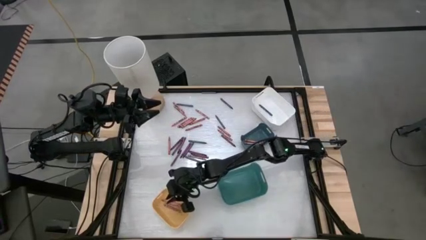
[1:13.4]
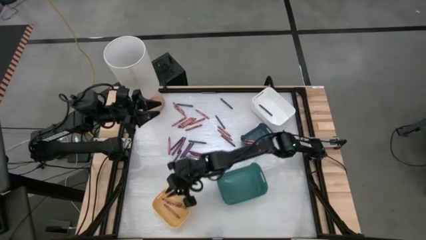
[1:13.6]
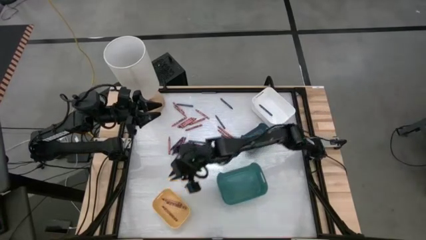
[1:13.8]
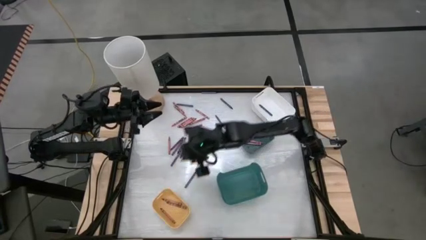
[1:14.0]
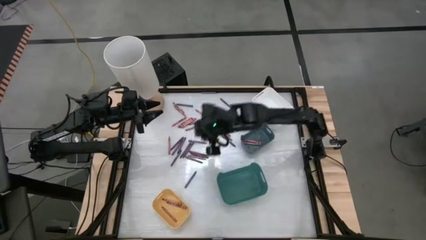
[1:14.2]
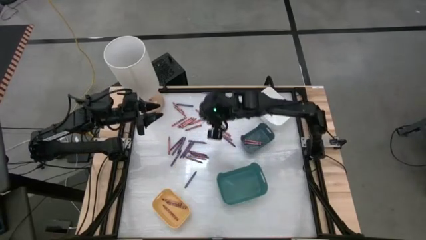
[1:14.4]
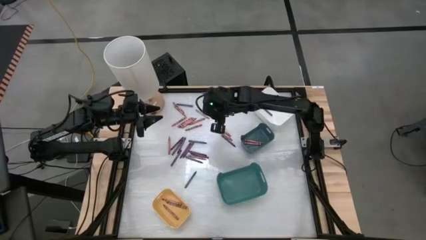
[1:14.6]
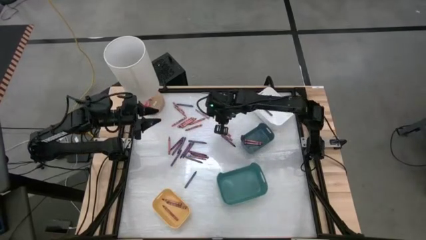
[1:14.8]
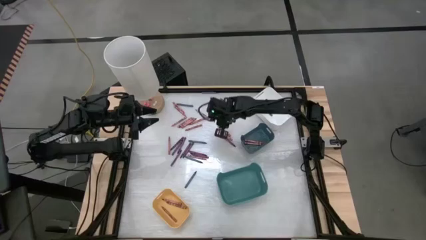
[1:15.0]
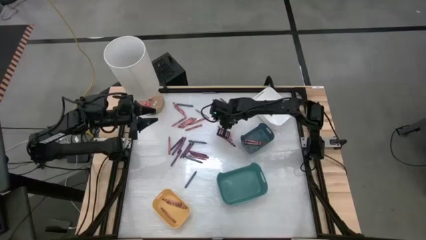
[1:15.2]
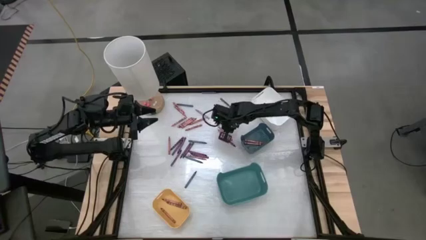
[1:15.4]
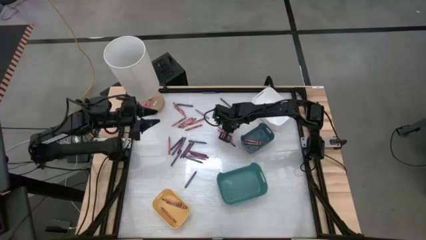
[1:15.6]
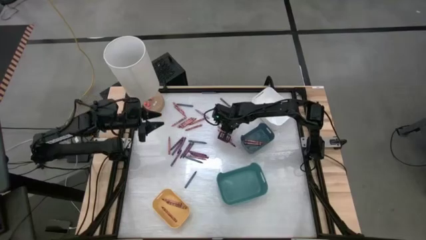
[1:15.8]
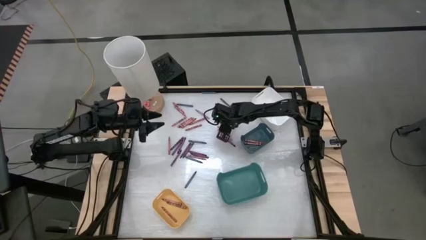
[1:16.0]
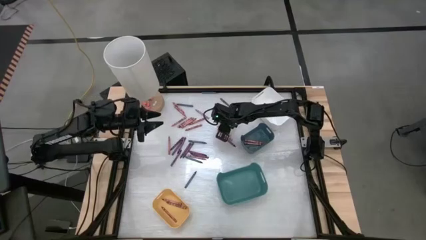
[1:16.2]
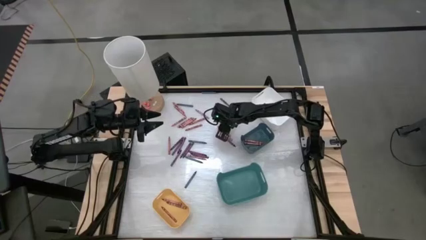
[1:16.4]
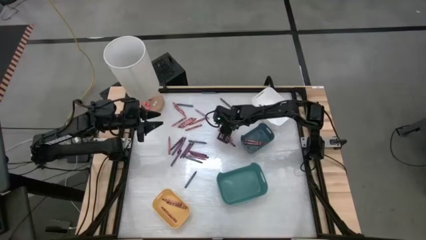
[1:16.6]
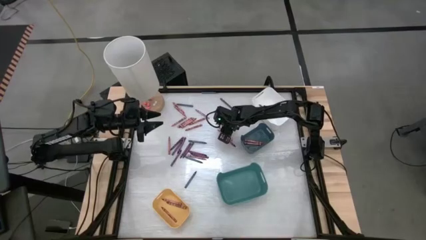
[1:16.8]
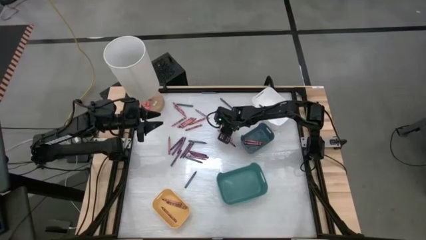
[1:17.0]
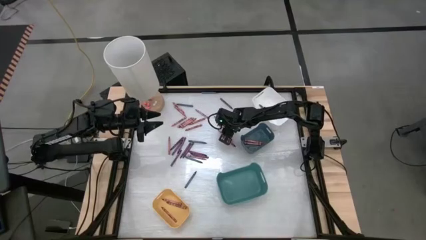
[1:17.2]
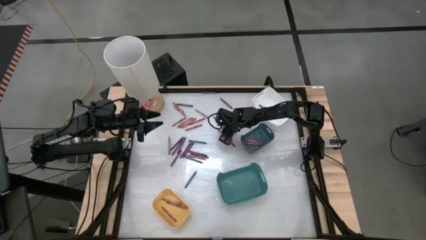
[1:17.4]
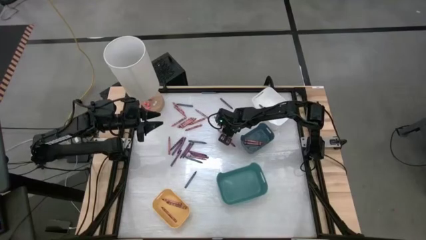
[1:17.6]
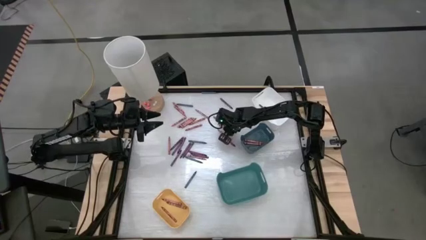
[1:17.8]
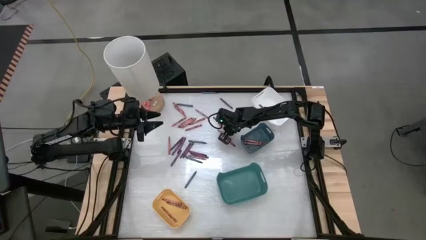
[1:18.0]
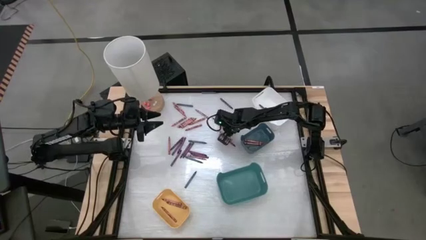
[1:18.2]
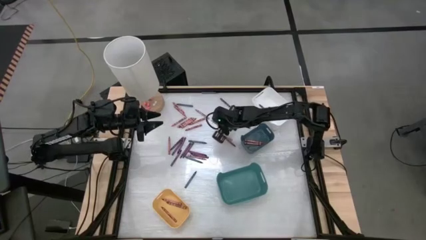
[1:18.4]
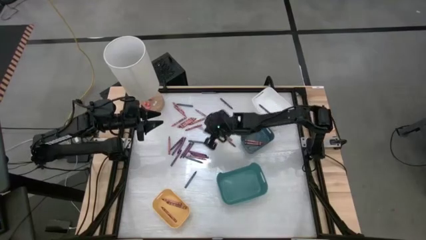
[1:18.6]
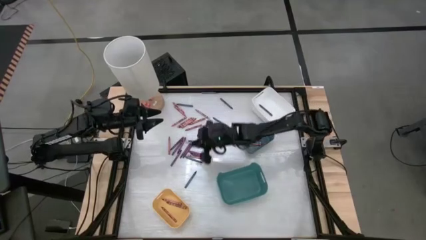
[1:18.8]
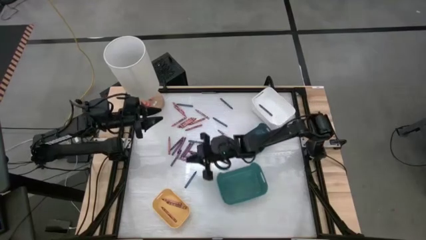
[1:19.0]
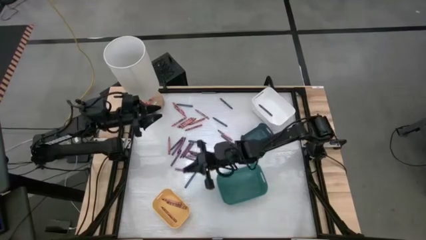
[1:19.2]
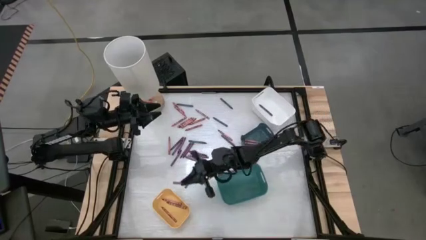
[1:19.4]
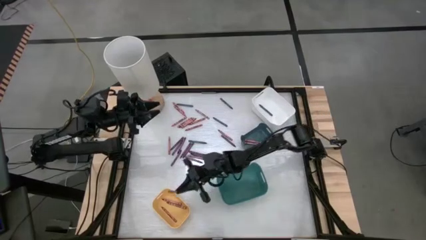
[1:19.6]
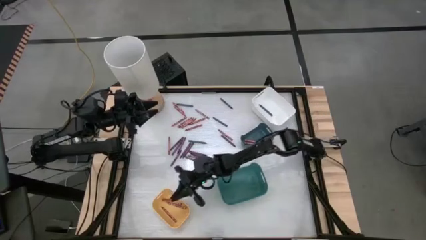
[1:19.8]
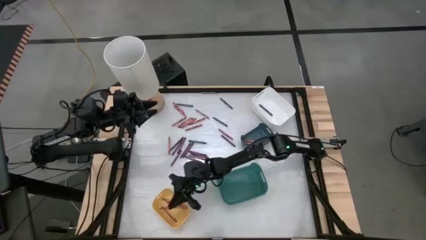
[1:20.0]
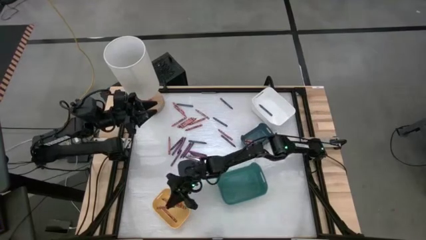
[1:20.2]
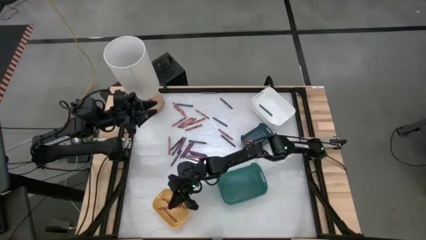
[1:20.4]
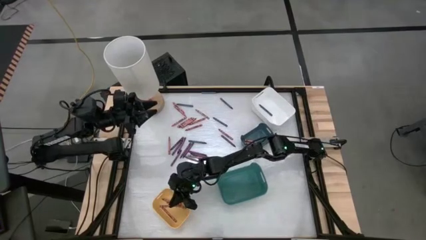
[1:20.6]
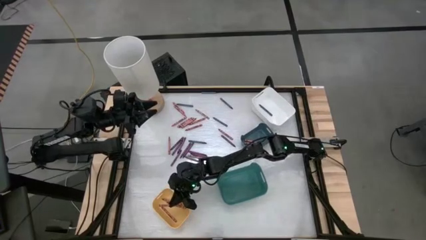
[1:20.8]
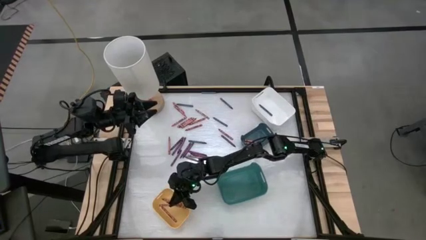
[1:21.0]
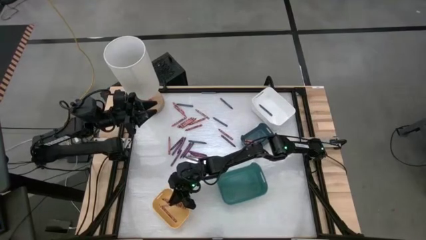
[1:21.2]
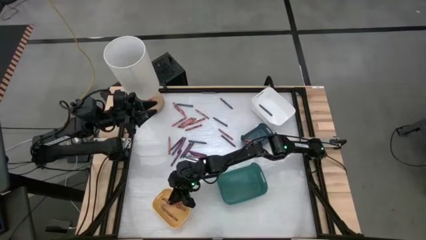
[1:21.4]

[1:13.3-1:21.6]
Task: Sort crayons
Put the red crayon into the yellow bin

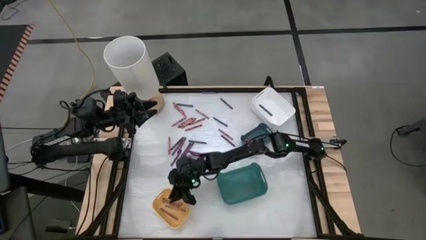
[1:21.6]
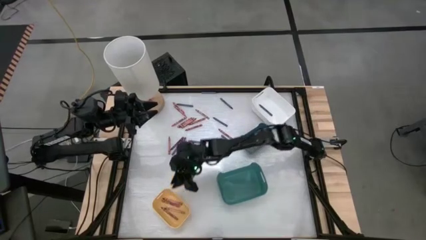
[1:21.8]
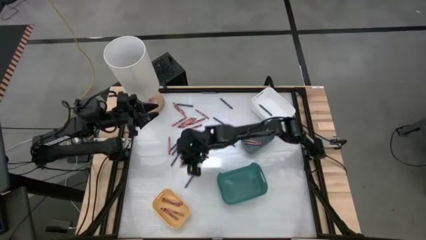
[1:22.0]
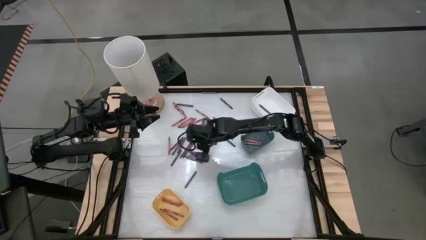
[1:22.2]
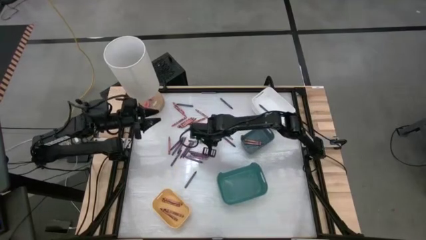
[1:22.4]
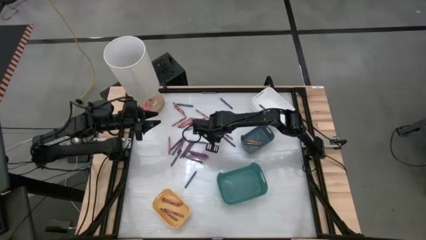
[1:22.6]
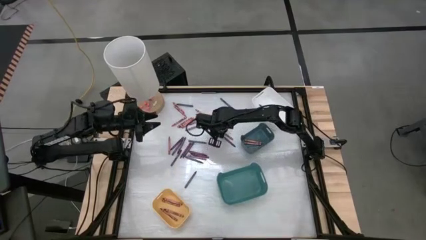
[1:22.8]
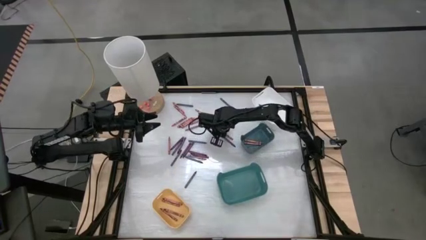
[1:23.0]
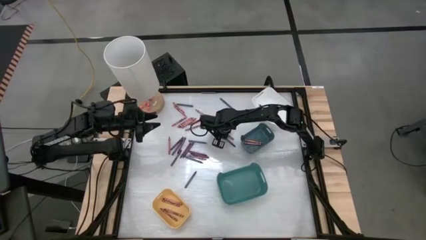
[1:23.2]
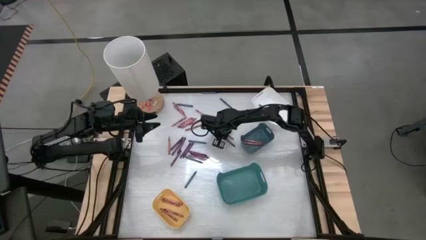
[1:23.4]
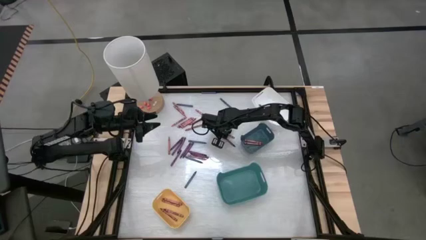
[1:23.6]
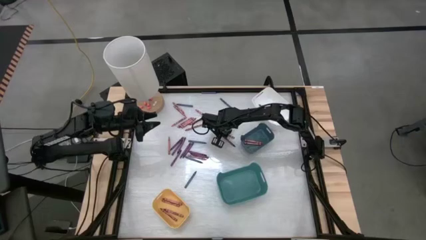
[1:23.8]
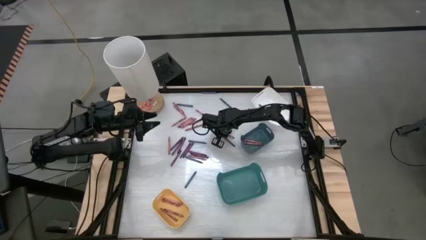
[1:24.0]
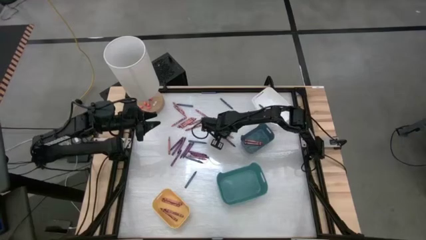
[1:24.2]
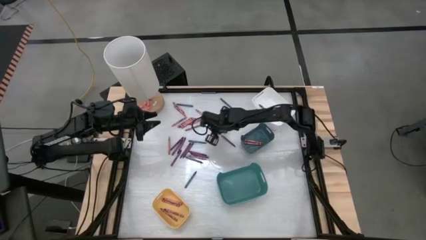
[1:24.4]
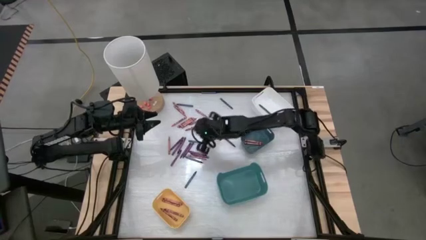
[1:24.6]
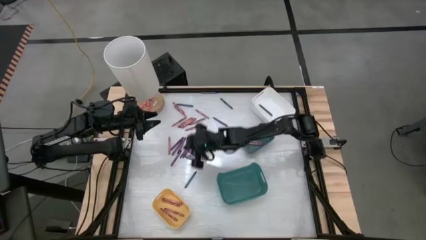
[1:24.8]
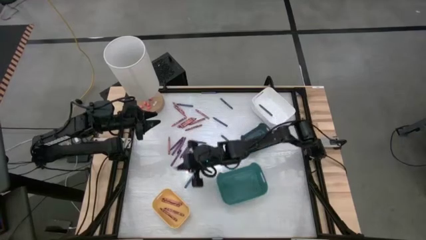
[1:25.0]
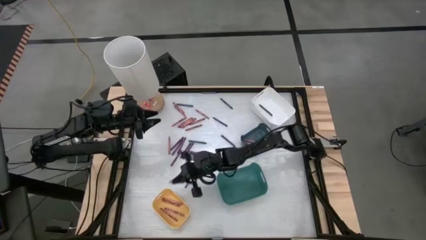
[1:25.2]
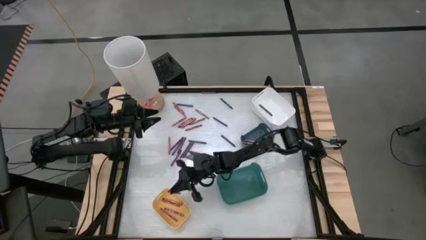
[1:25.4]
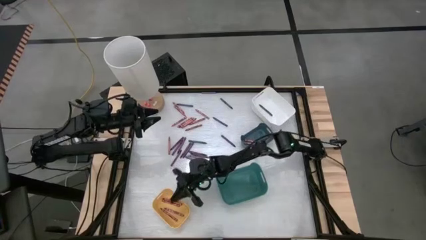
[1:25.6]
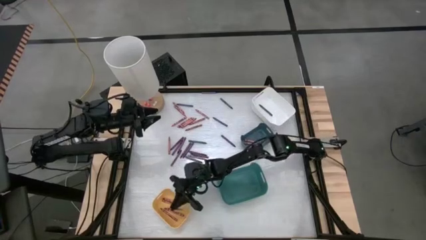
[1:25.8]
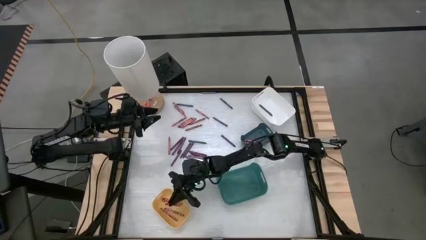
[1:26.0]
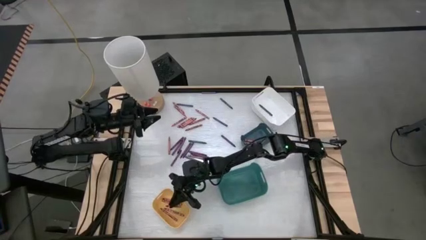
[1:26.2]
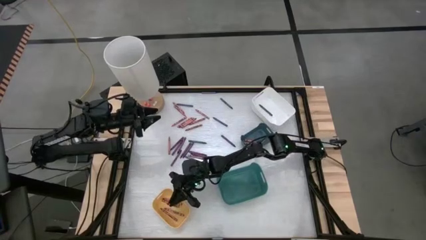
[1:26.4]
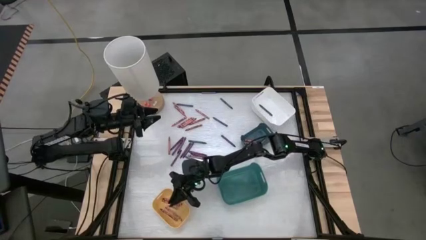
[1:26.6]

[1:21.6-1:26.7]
Put the red crayon into the yellow bin

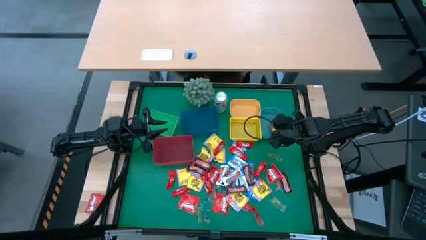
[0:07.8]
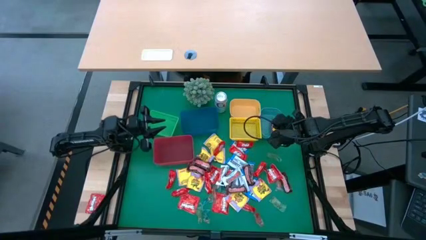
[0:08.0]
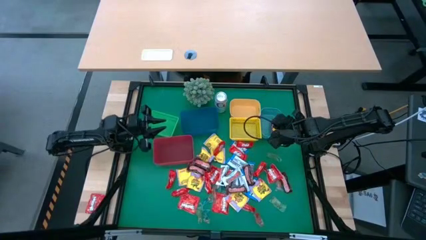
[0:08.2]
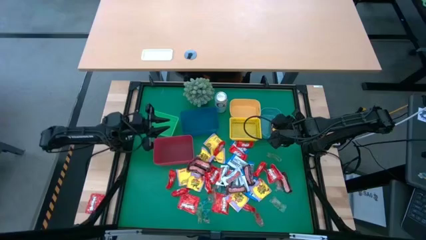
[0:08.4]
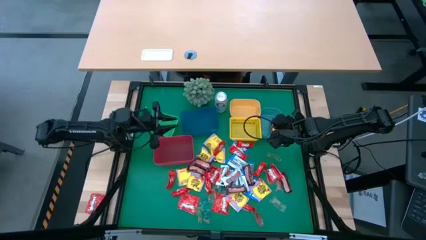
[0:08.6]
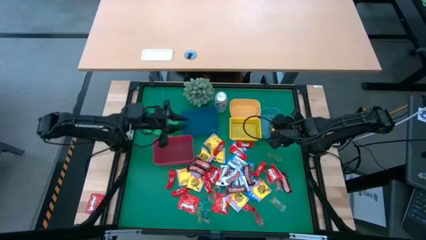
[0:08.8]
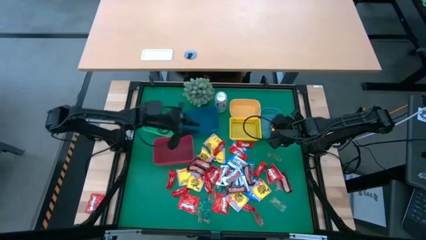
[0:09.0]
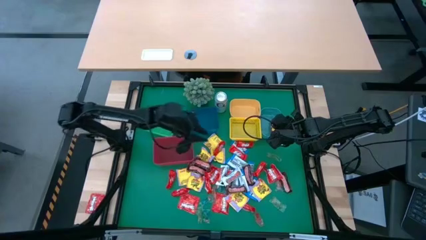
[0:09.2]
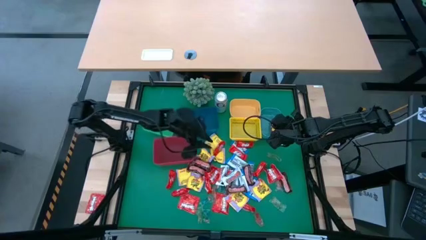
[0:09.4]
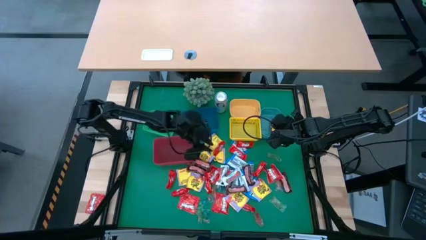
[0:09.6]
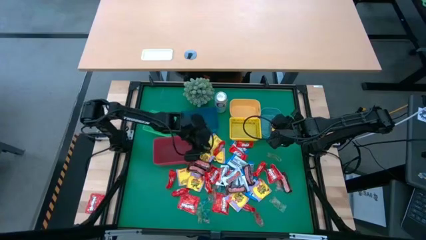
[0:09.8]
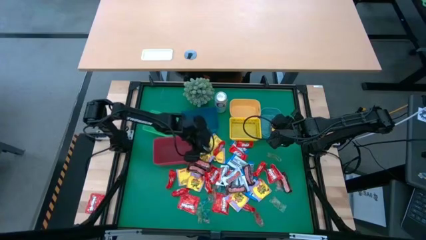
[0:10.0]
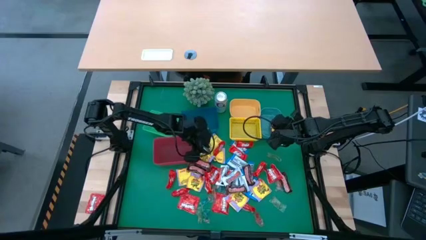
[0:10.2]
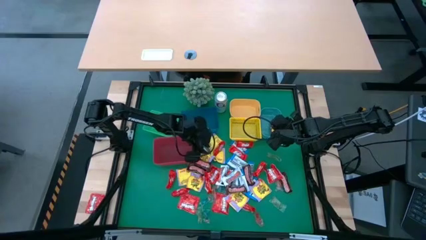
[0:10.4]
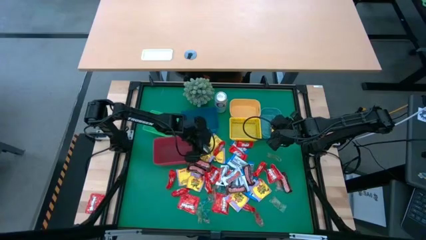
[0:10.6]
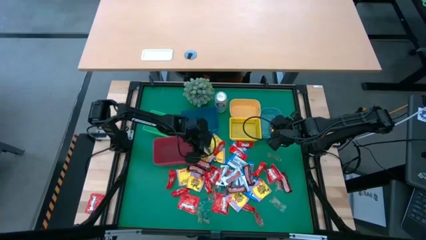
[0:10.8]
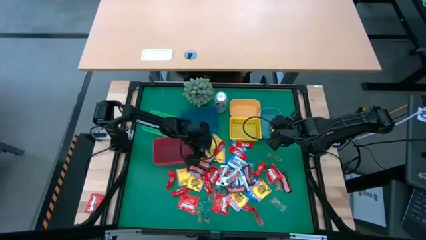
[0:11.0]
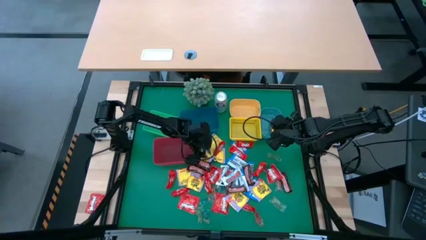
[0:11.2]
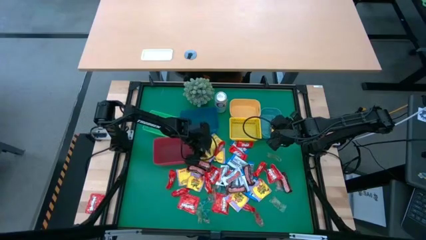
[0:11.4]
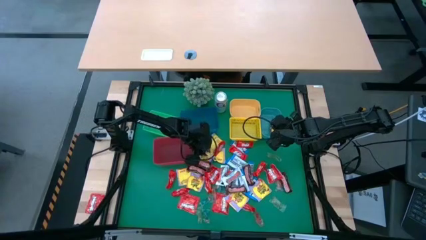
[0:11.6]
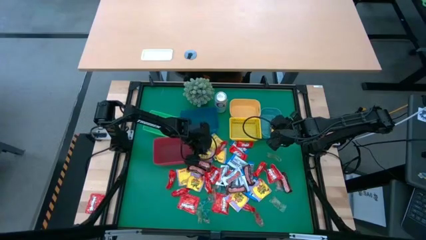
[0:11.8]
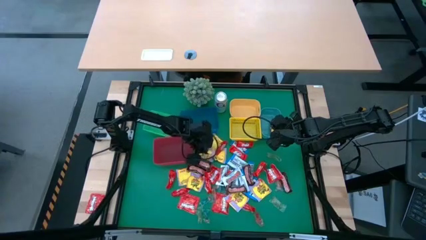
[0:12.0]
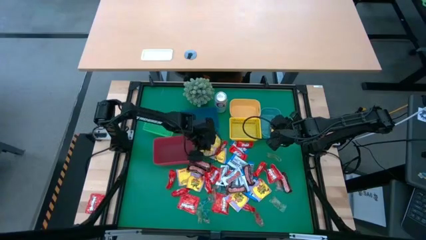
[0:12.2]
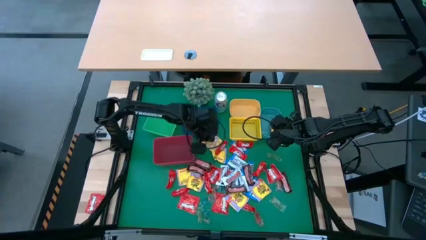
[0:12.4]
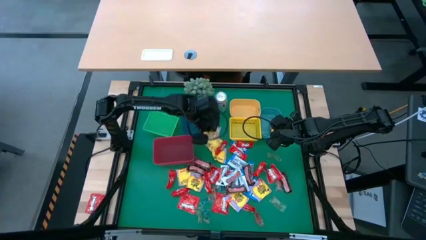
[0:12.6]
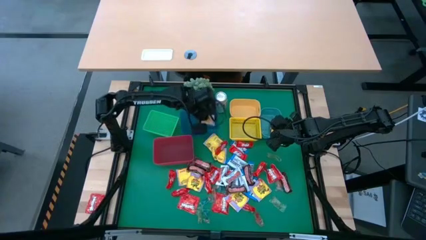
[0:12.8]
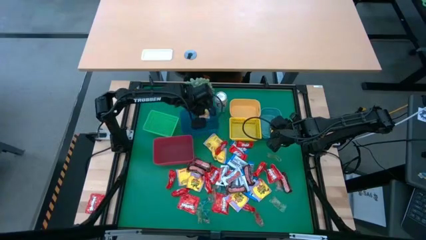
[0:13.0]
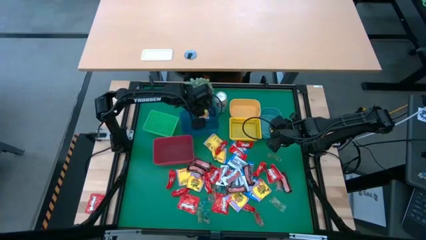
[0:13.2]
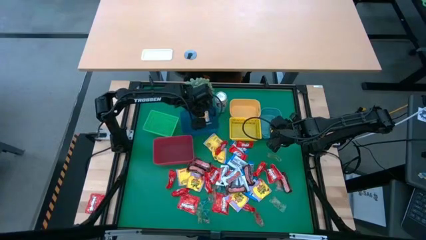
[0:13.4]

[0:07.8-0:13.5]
Task: Sort candy
Put the yellow candy pack into the blue bin
